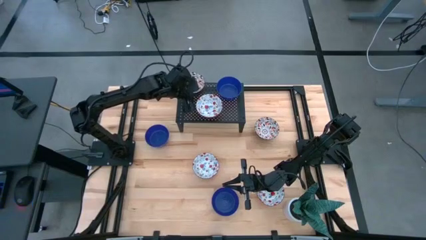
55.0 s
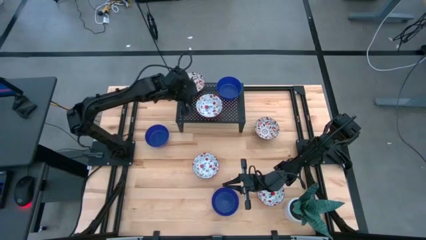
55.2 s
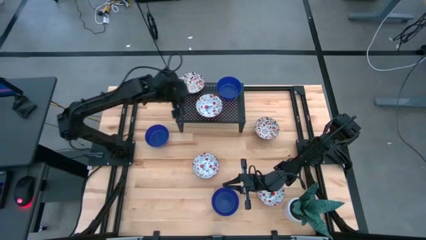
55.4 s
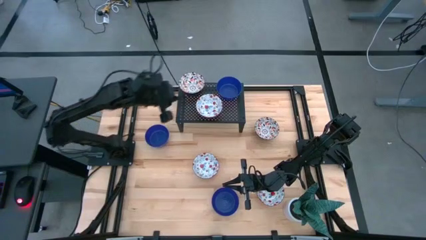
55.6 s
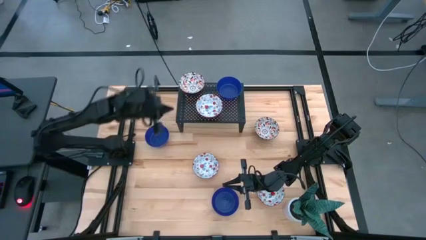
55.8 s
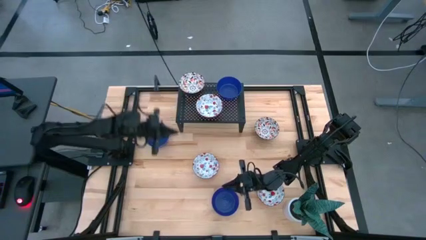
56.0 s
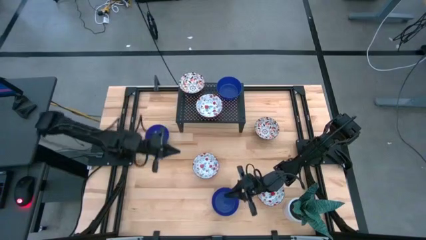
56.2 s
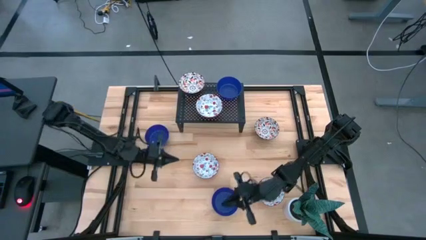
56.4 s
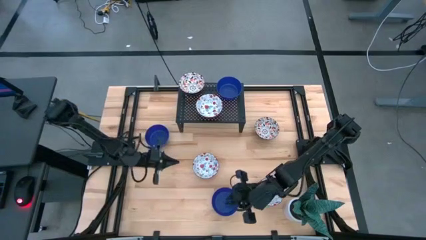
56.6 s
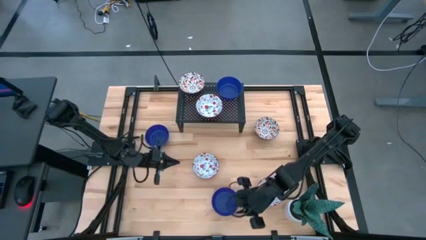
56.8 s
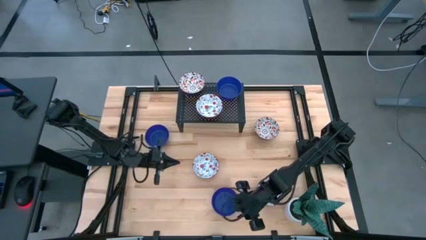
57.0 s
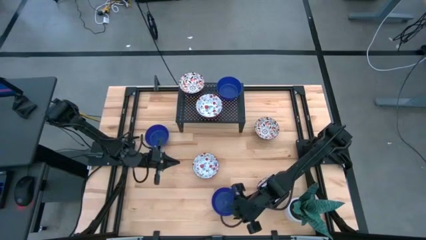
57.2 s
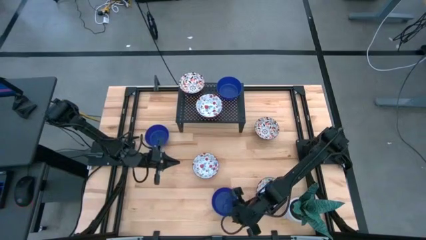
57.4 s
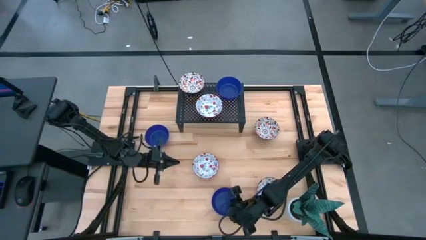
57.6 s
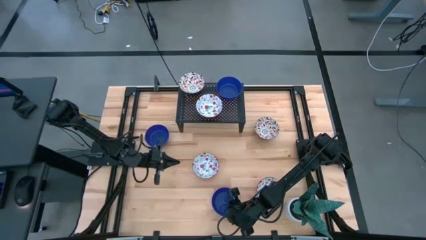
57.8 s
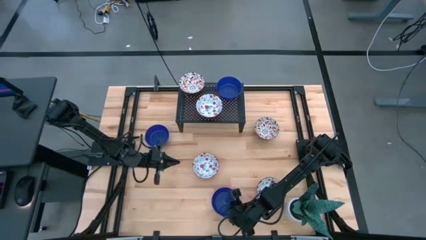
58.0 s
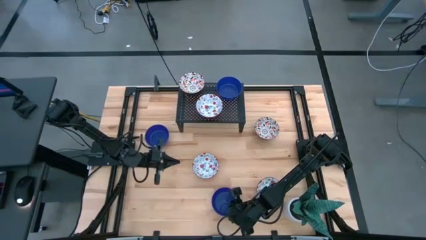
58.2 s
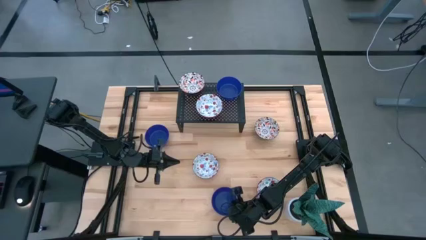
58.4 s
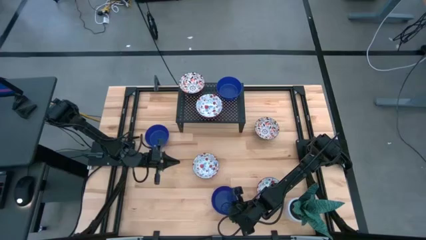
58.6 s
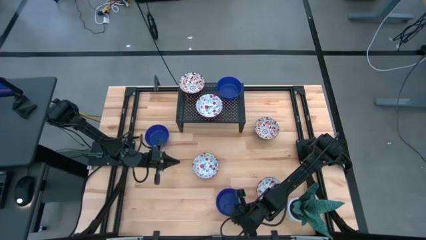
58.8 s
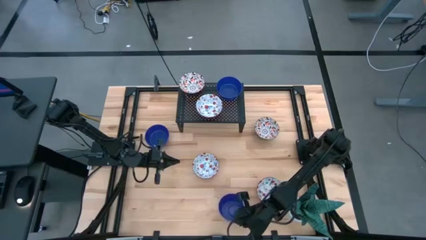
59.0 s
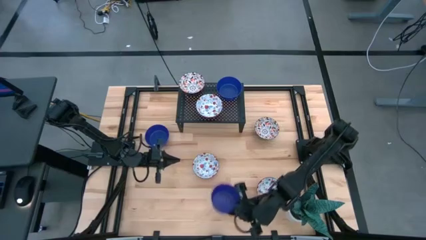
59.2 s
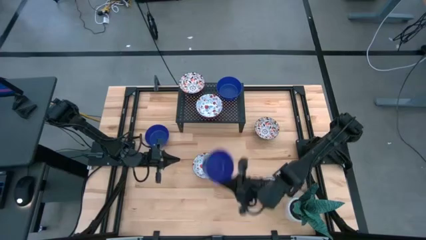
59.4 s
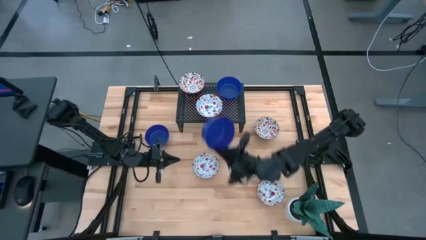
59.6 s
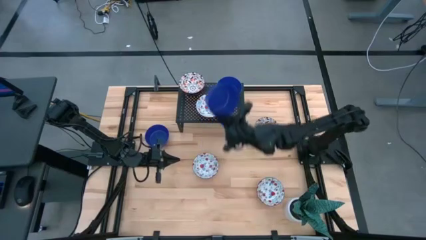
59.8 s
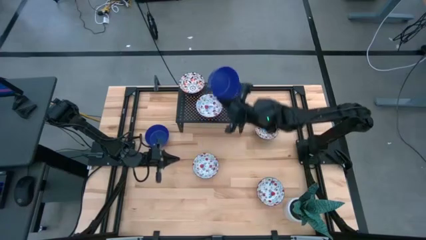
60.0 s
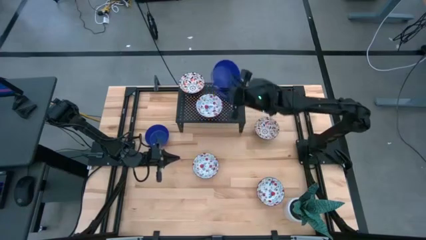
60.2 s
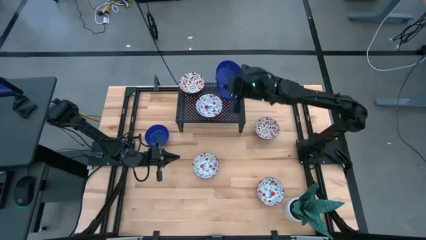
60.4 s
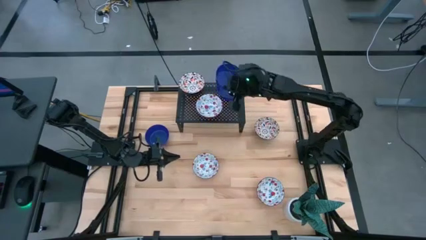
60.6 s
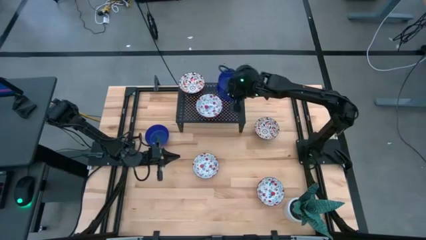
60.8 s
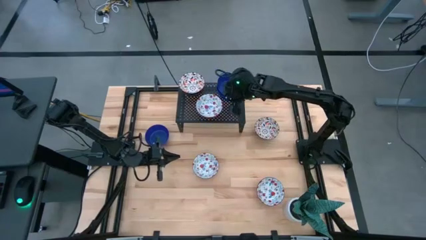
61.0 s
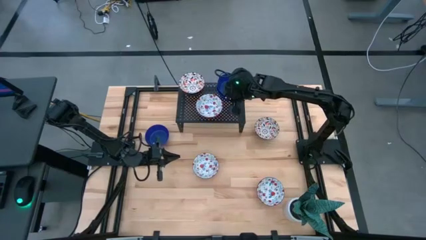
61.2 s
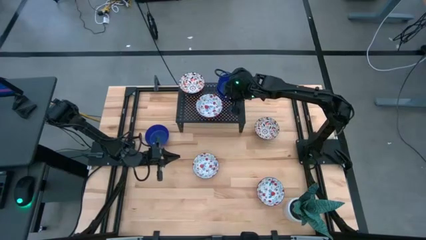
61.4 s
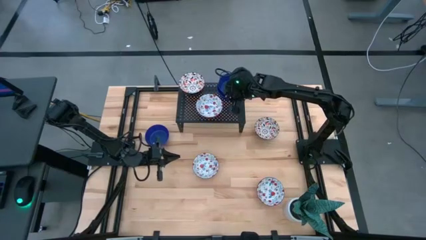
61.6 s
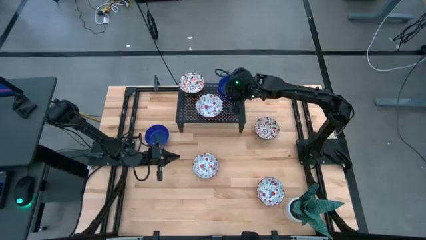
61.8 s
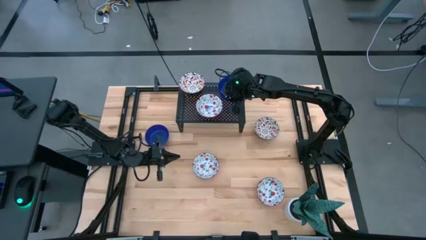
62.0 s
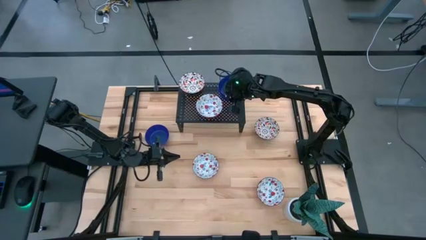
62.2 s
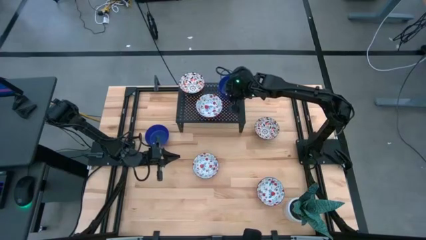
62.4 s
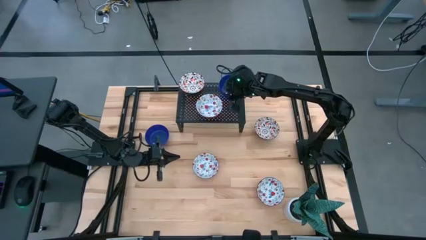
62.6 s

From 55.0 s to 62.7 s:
Task: Pick & Place Mini bowls
Stack the bottom blue bowl on the blue bowl on the shelf

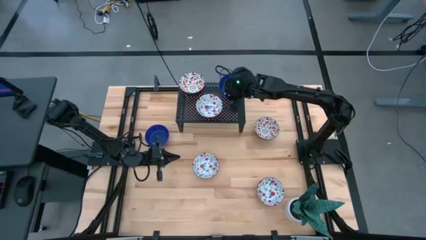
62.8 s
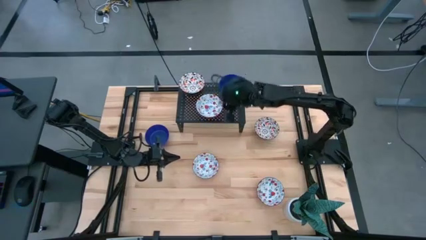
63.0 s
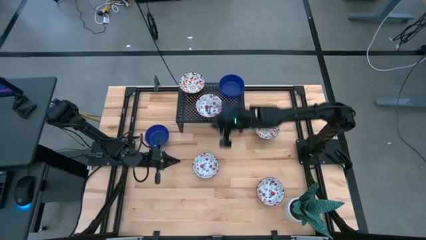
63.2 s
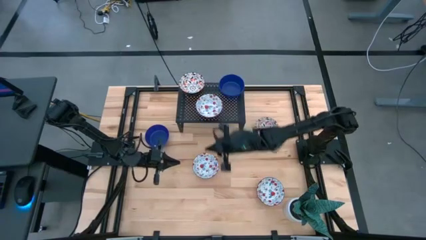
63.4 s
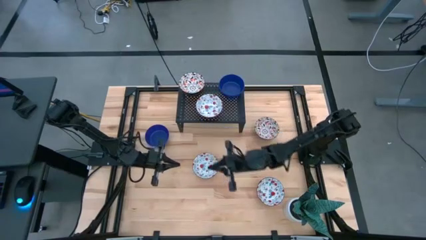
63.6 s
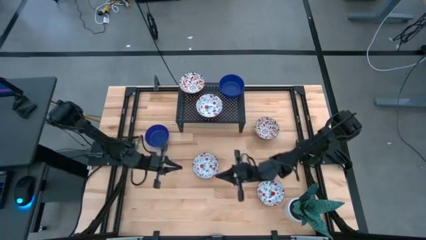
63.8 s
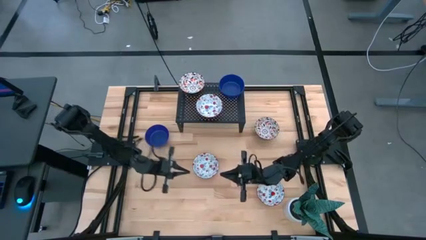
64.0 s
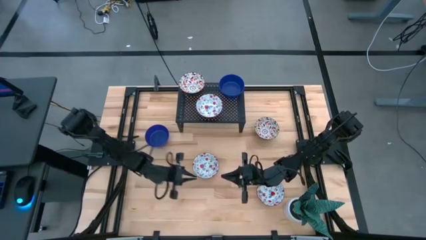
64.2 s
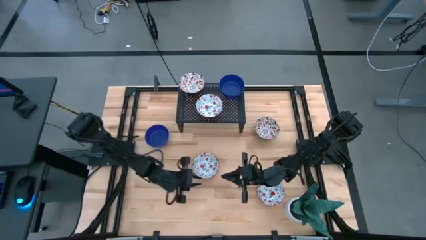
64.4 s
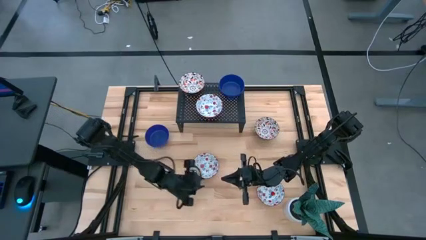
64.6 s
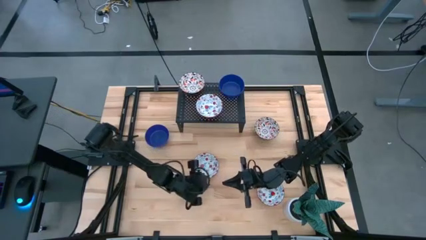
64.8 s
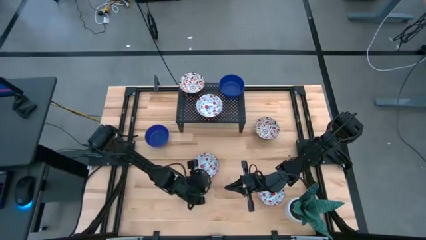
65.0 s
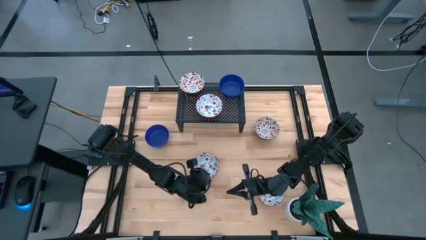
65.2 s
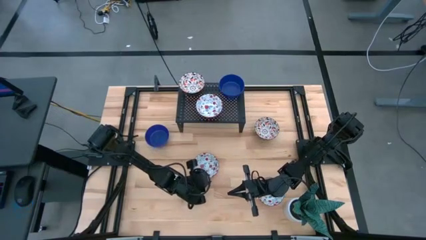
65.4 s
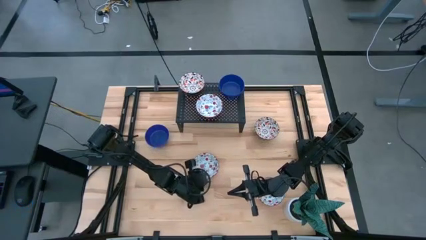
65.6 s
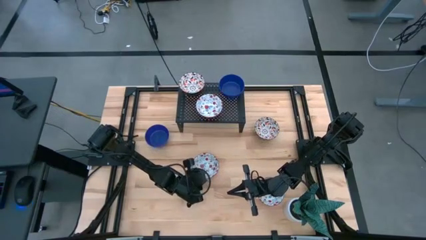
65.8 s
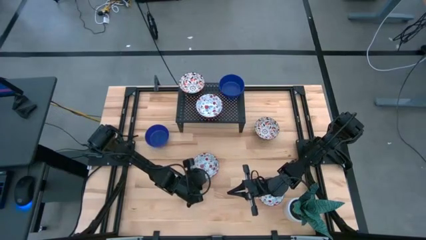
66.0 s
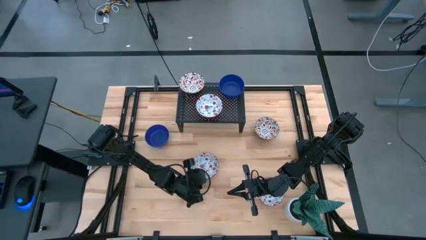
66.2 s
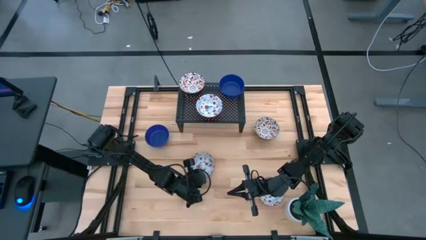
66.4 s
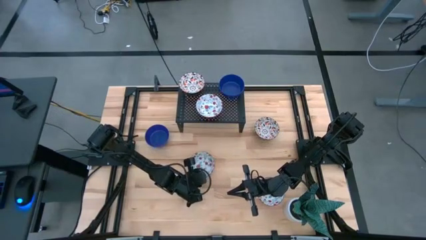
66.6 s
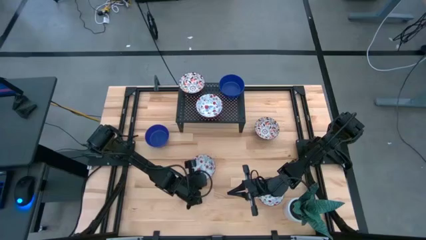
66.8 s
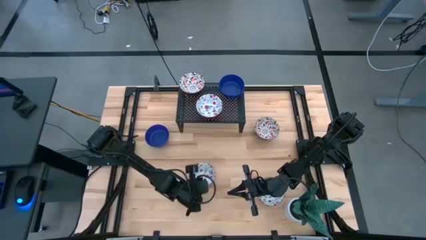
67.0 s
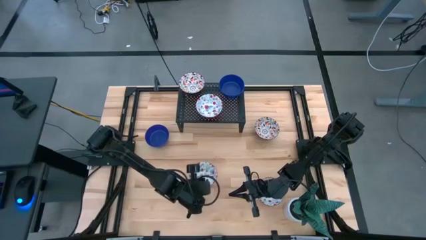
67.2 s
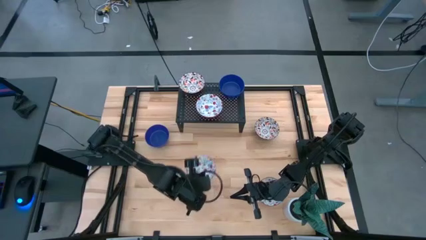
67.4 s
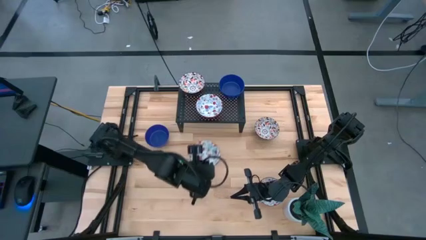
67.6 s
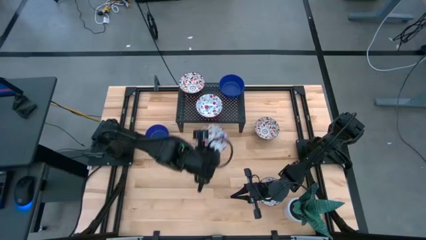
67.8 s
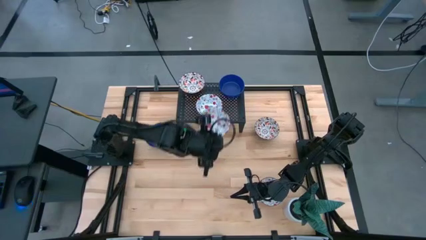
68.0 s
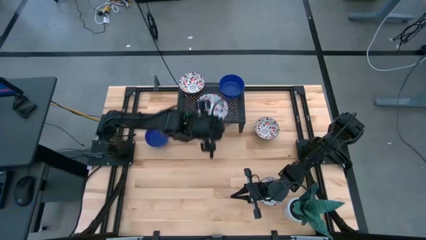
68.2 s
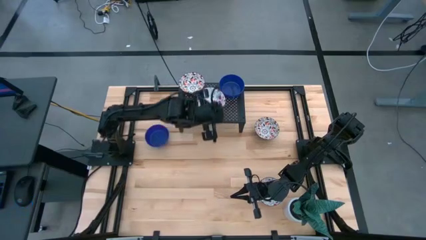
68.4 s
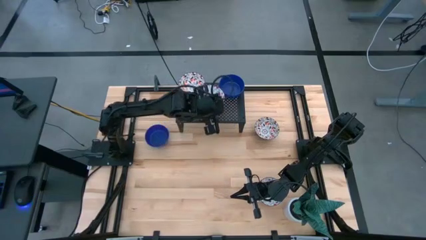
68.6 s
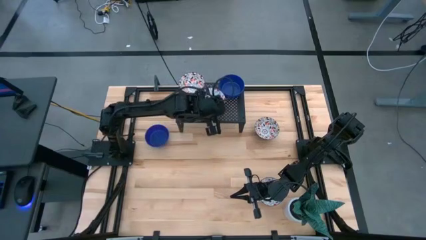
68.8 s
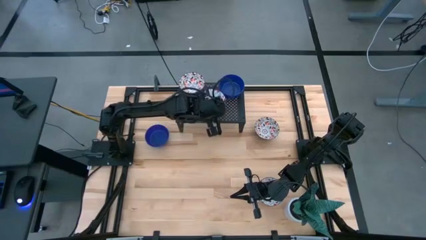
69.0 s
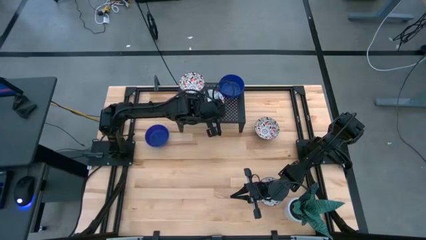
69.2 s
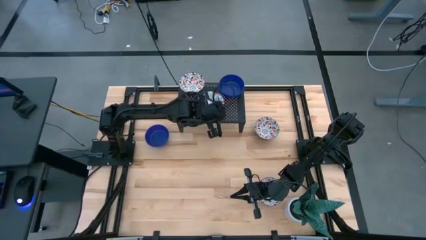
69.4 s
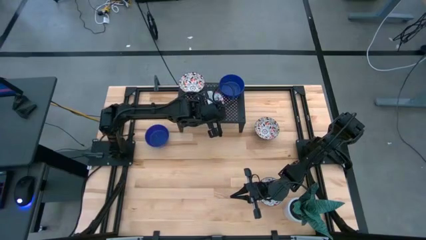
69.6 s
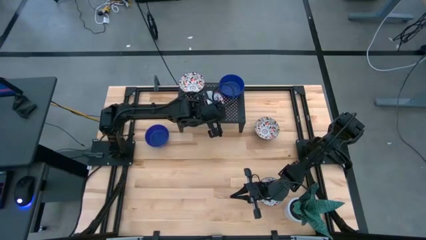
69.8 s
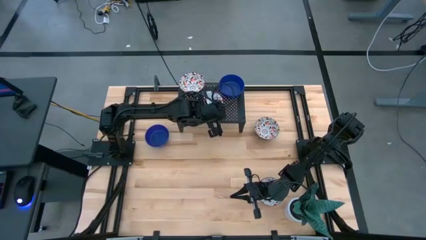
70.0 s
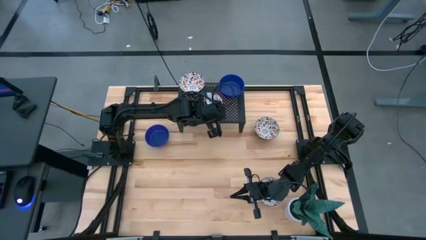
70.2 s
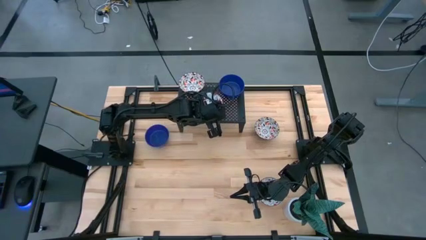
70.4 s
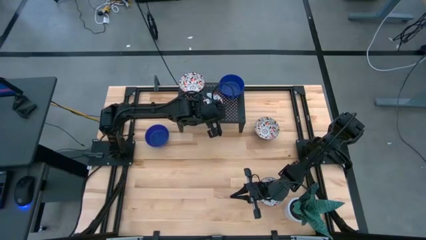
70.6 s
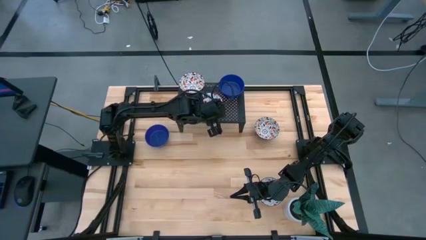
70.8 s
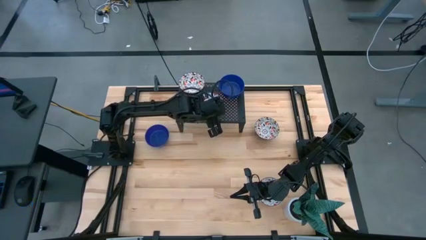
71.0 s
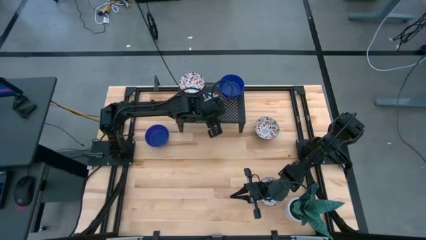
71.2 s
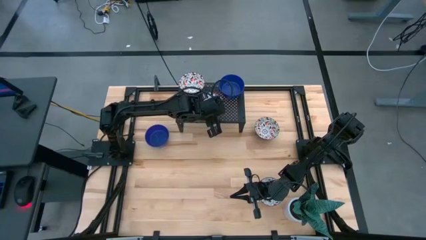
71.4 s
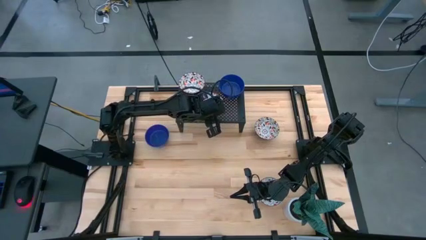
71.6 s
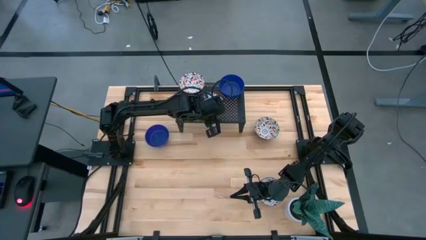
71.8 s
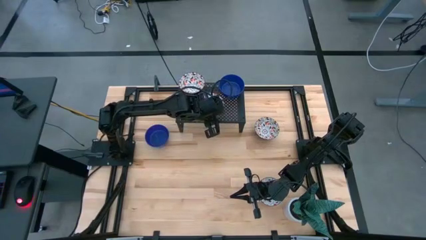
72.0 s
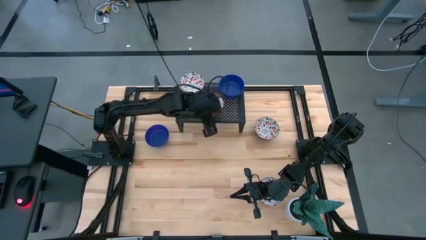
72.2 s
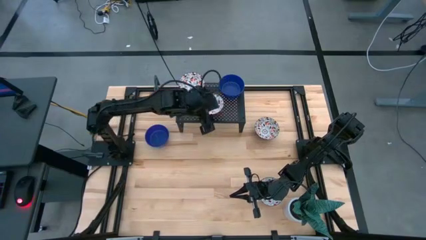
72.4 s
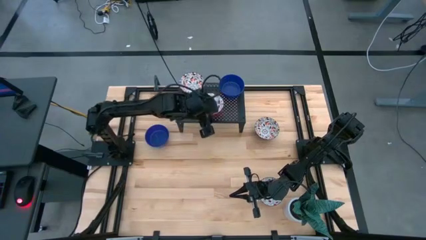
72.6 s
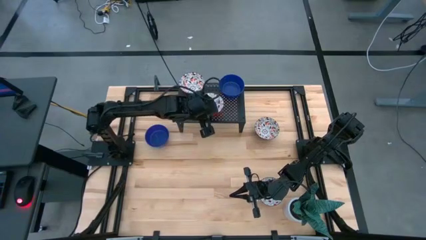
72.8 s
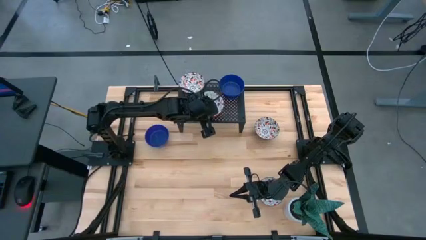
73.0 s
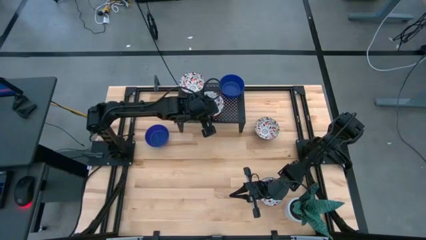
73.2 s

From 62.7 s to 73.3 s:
Stack the left red bowl on the red bowl on the shelf
